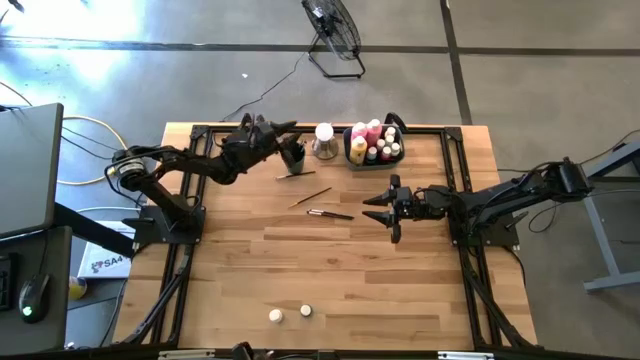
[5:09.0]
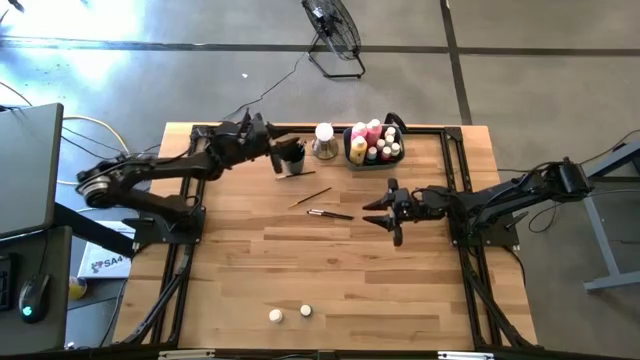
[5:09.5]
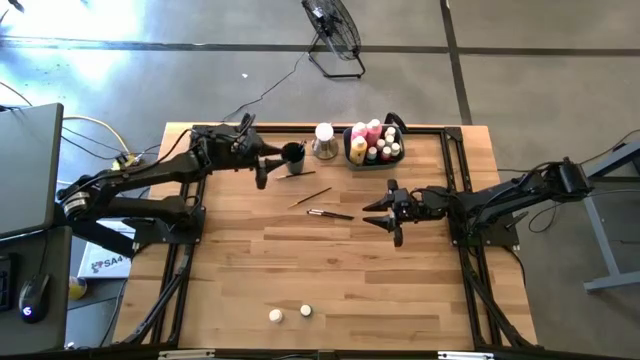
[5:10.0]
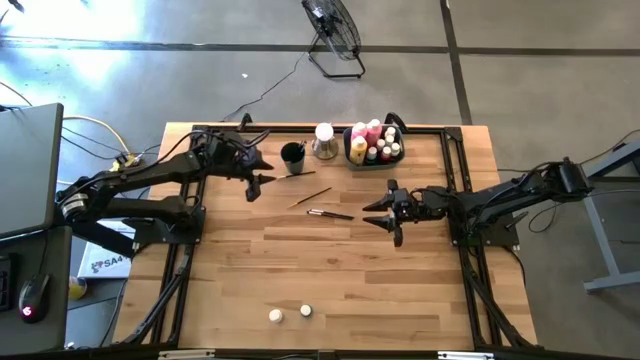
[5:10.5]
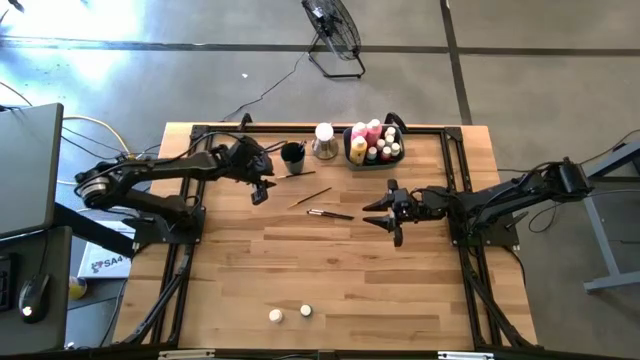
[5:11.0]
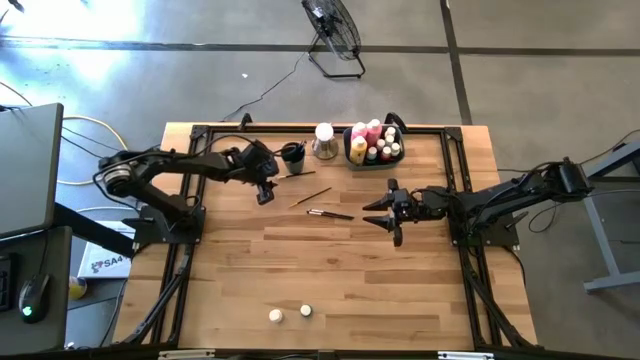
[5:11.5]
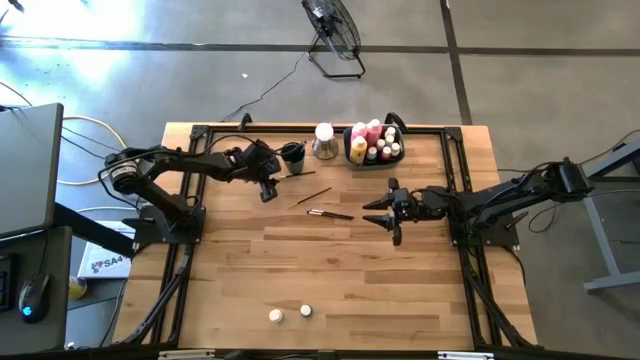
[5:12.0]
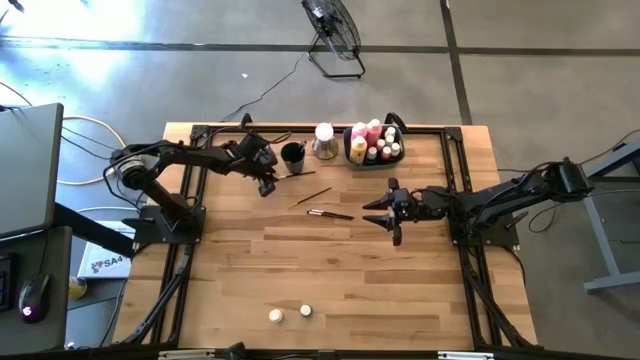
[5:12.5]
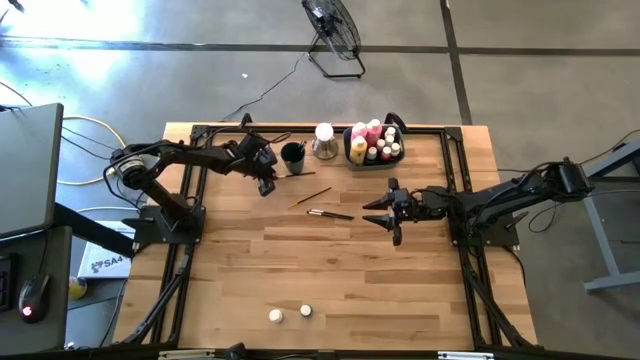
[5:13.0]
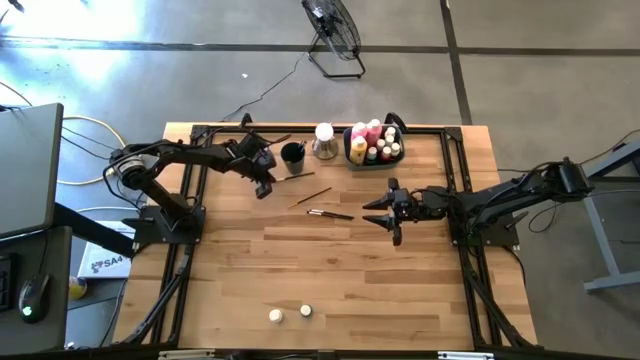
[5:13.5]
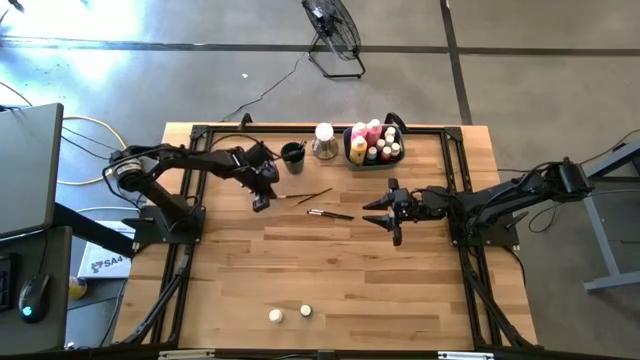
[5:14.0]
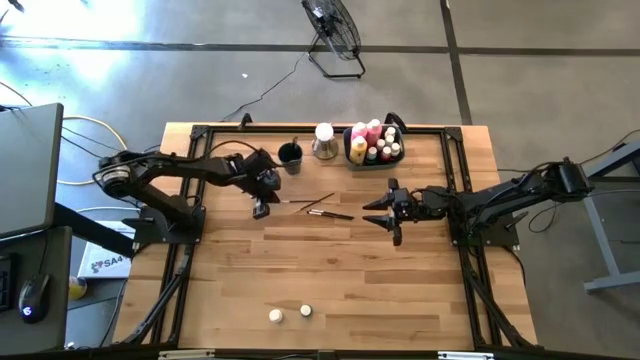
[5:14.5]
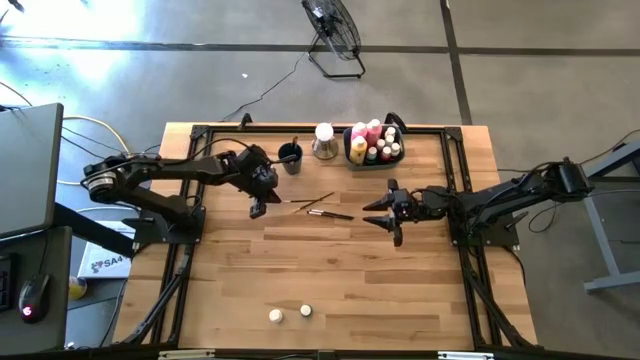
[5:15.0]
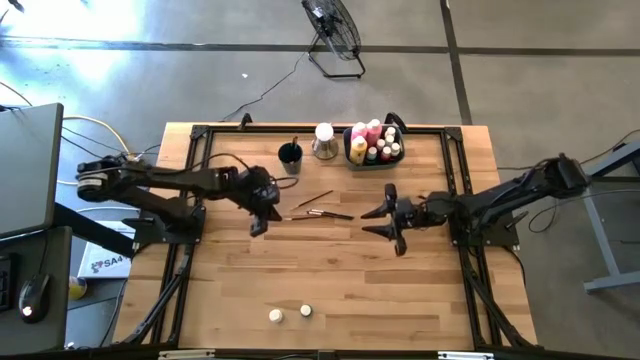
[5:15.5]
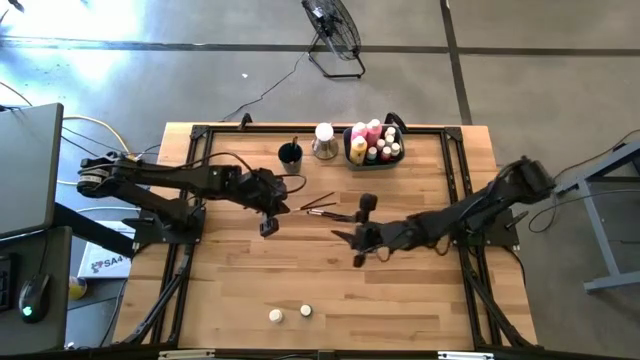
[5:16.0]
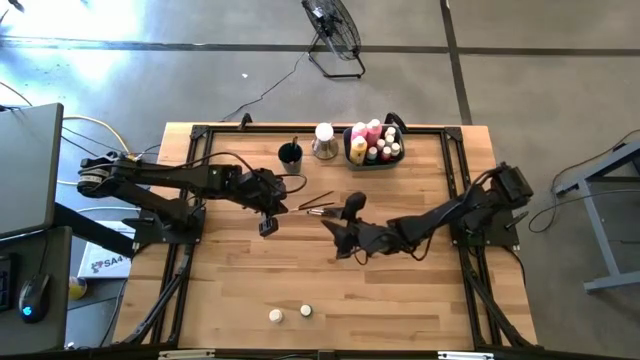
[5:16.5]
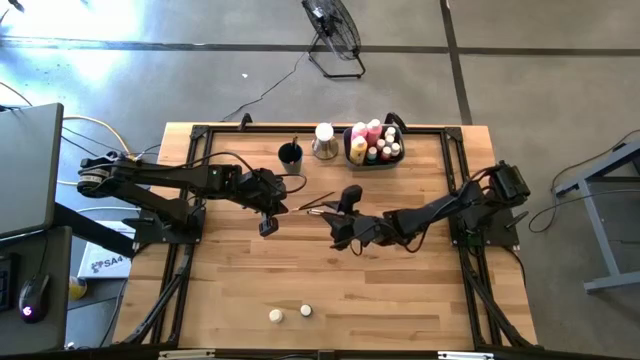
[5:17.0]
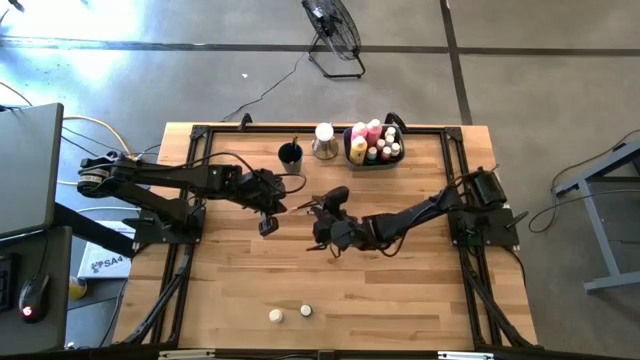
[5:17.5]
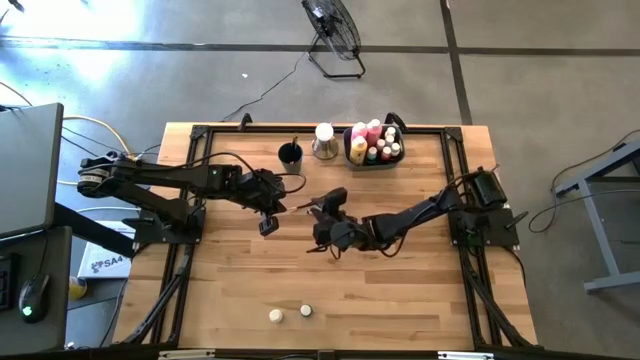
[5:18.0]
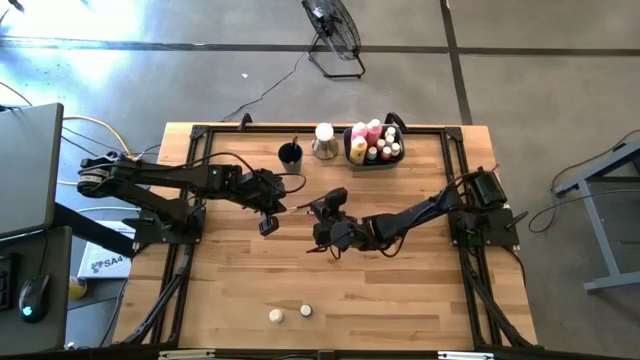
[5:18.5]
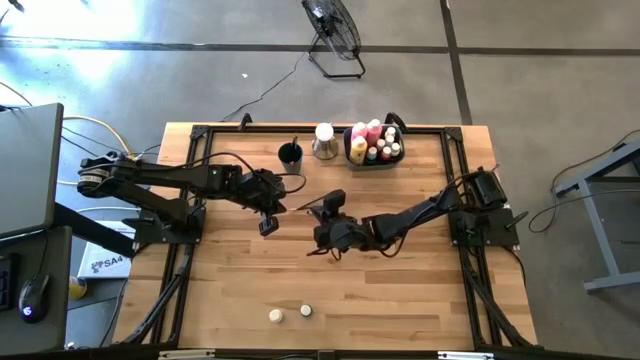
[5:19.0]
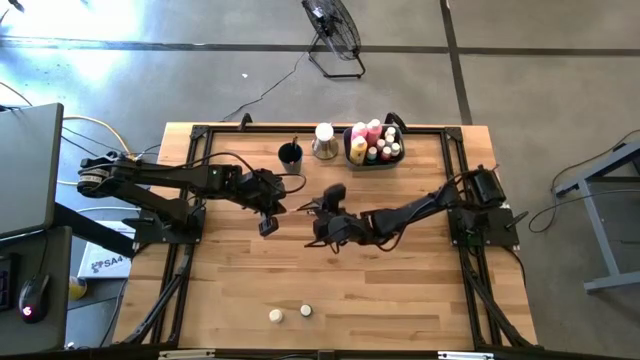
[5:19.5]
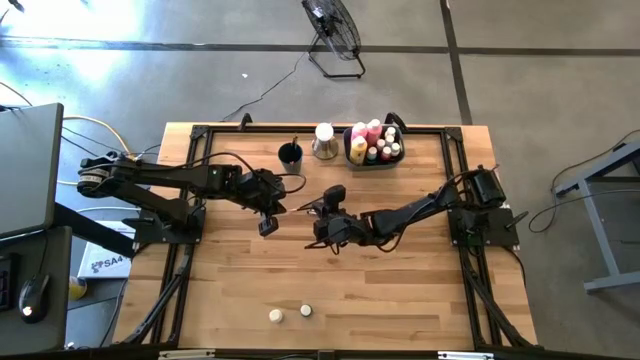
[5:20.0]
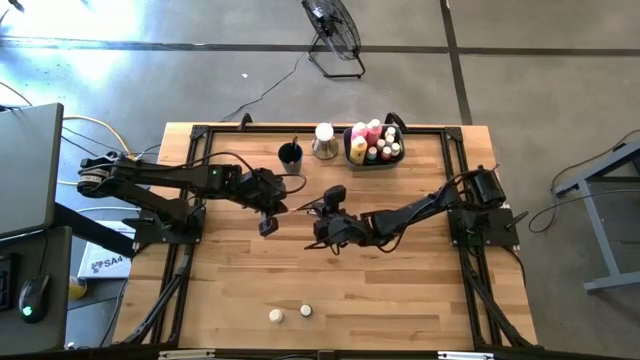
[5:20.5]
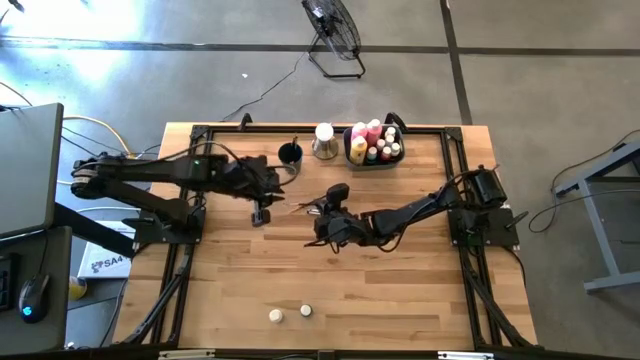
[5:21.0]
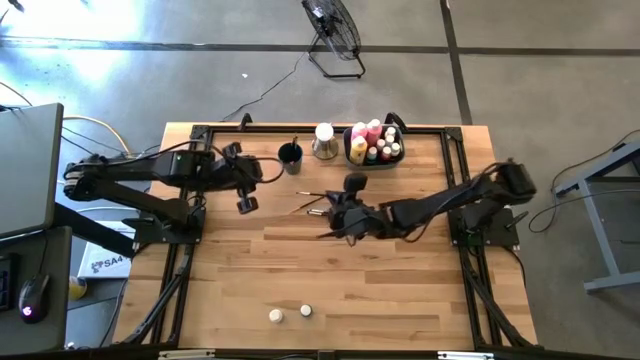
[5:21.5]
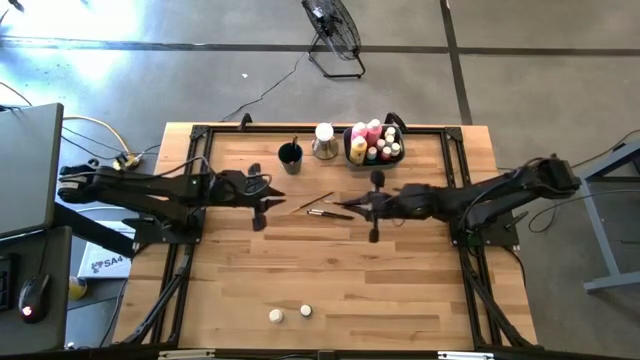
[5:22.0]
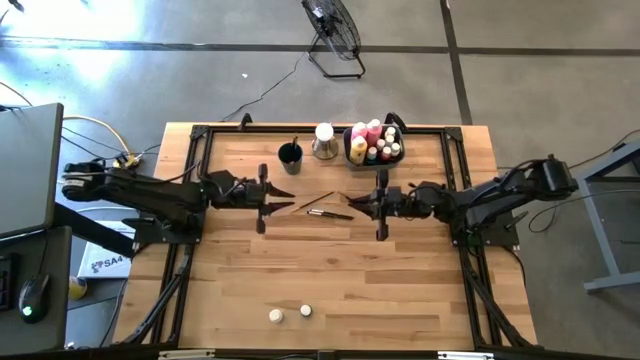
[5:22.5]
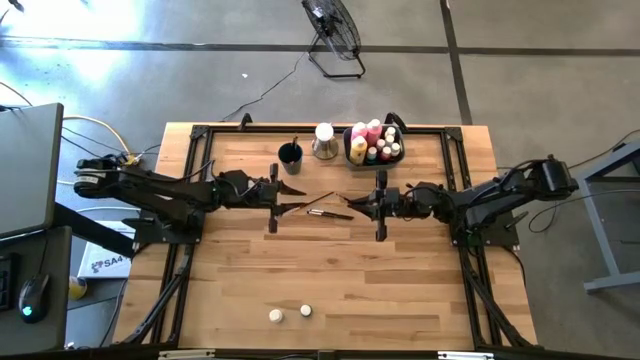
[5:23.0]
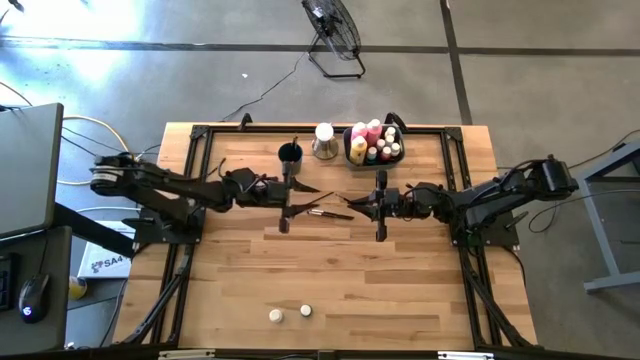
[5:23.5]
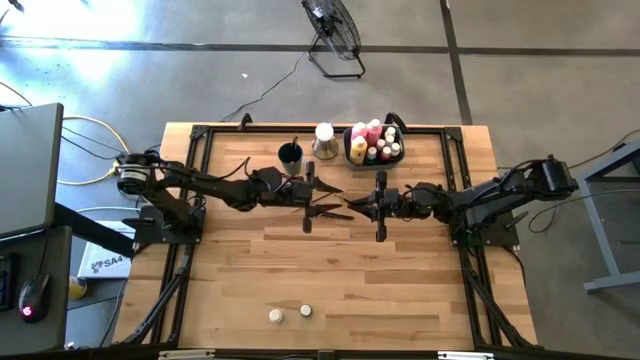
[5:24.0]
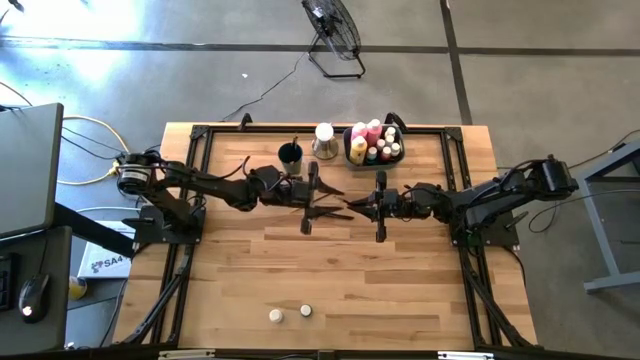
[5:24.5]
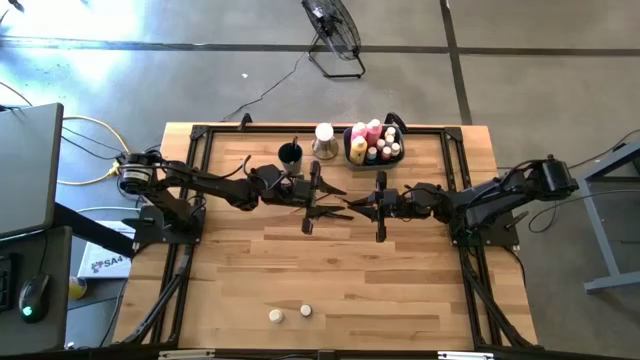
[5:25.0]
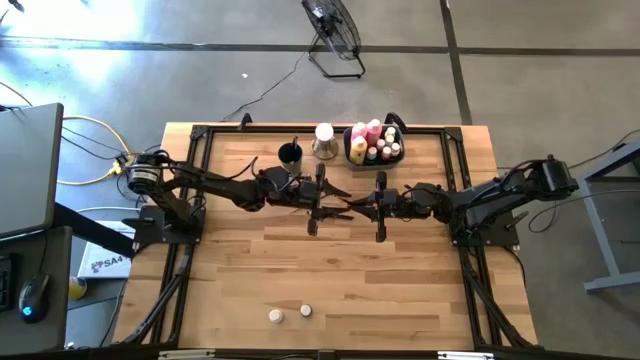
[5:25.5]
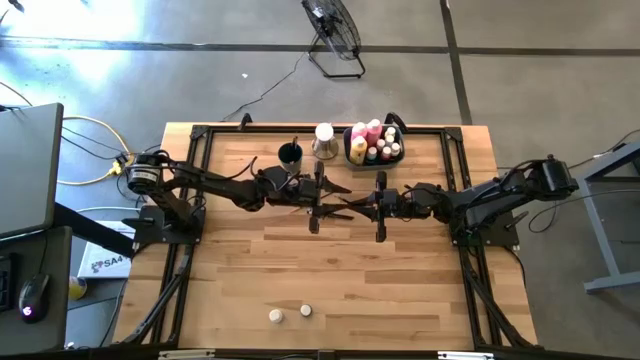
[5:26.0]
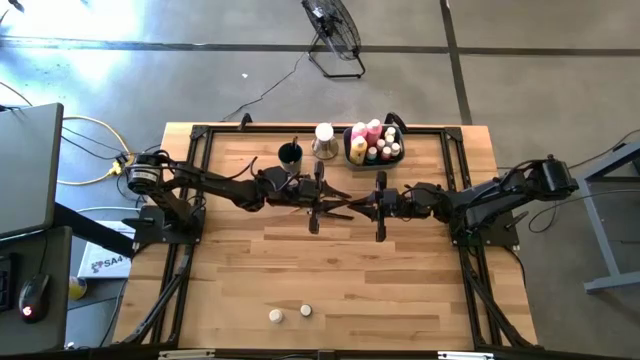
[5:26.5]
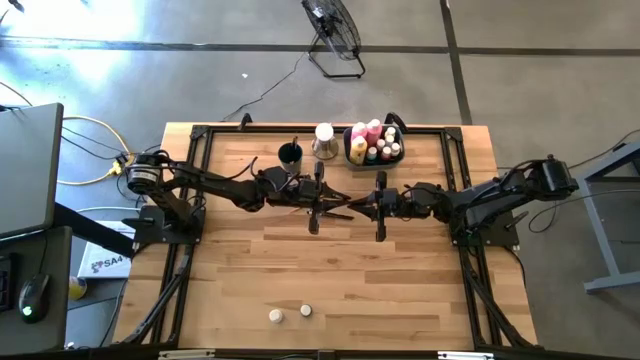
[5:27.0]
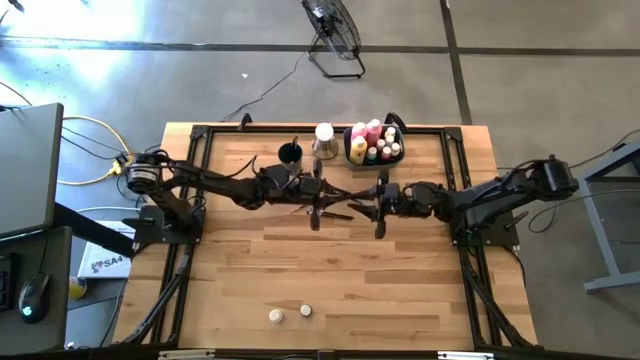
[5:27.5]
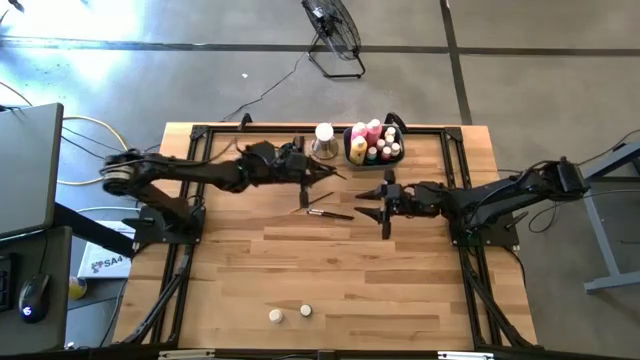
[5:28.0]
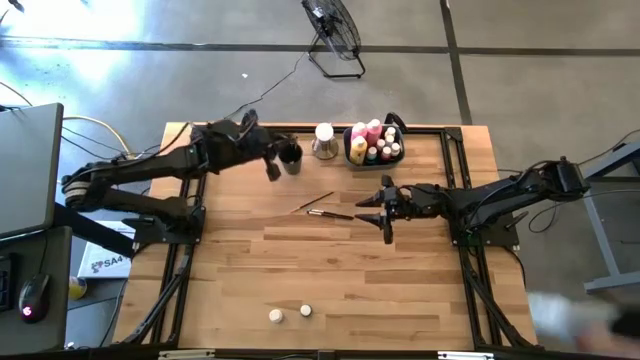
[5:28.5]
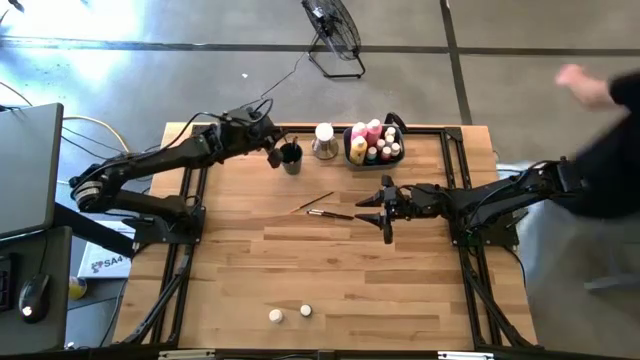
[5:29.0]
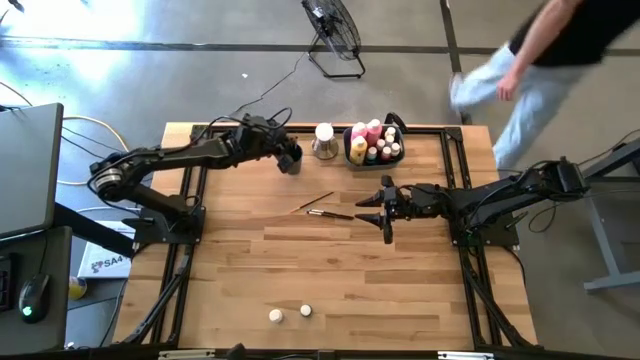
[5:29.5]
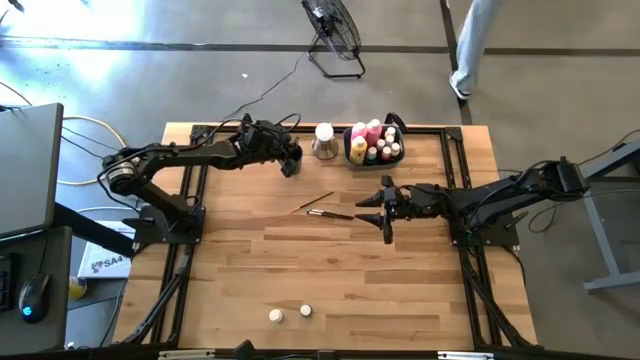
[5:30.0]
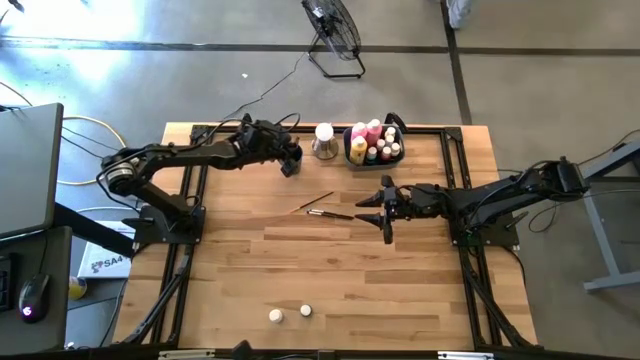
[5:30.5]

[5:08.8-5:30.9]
Task: Pick & Place Paint Supplies
Put the silver paintbrush into the blue cup
